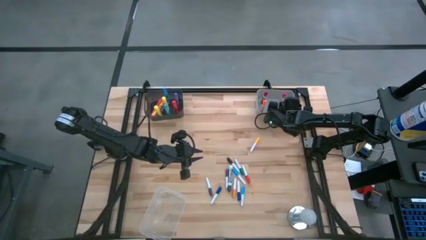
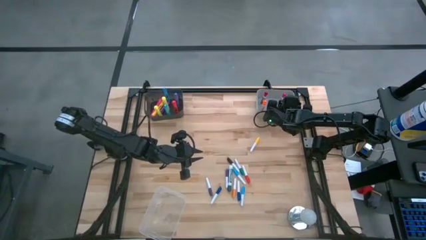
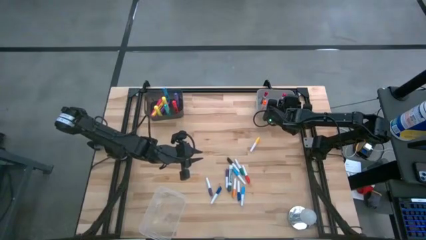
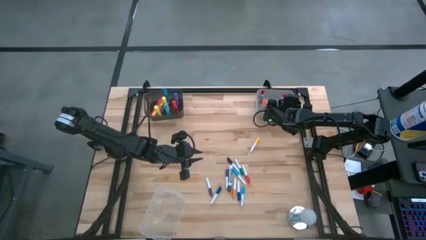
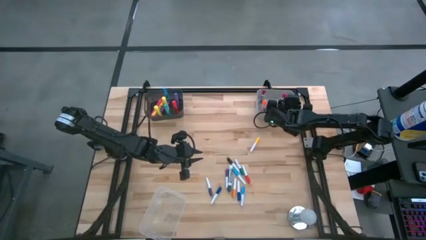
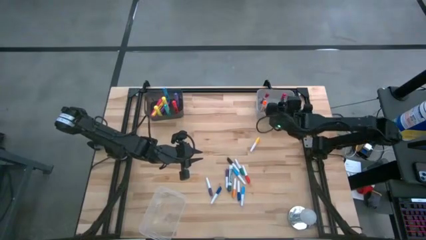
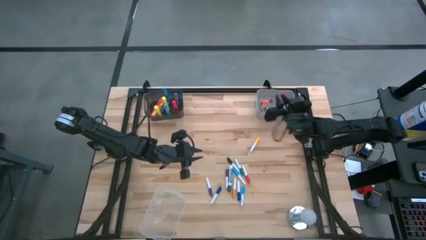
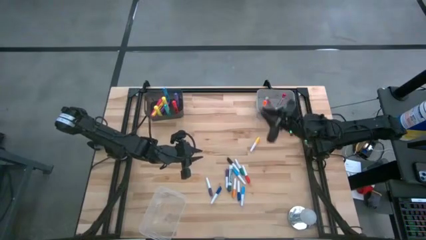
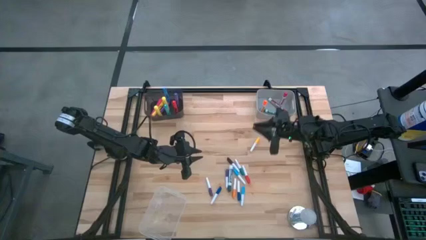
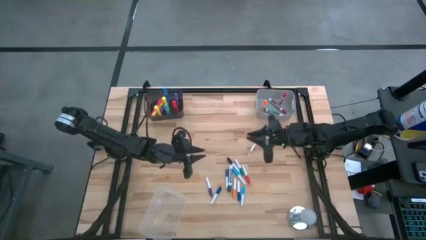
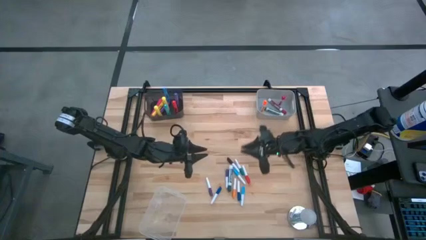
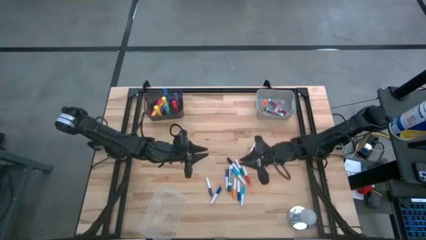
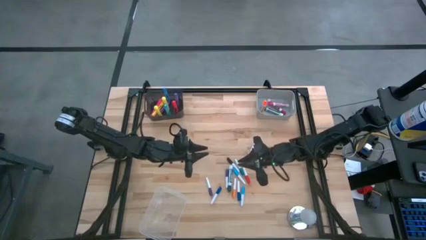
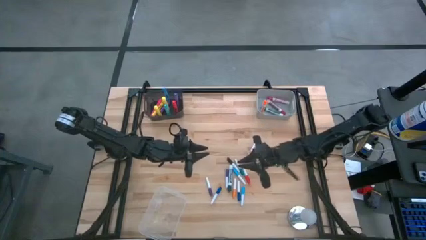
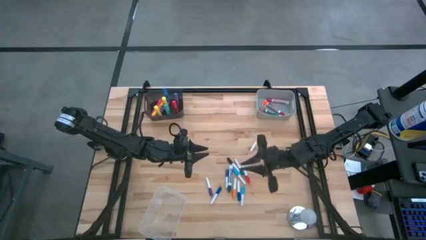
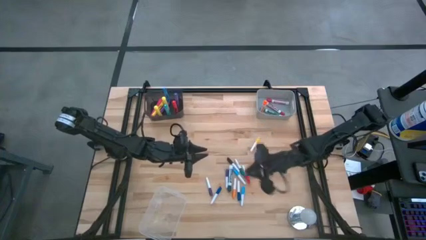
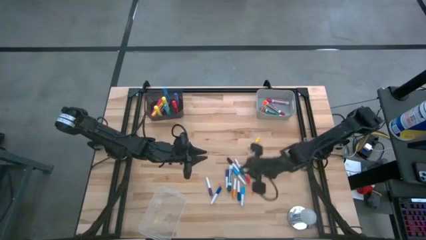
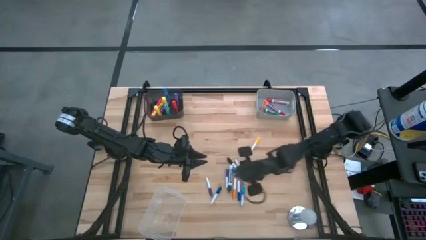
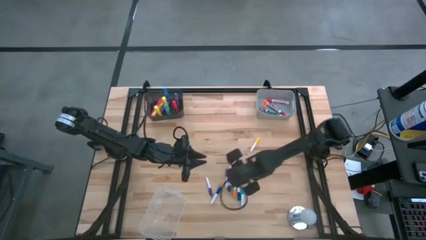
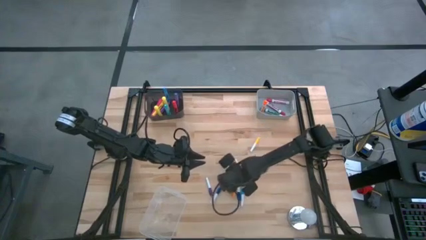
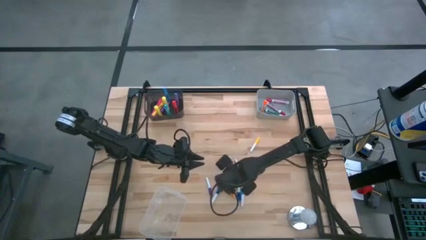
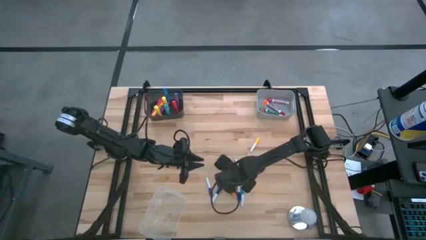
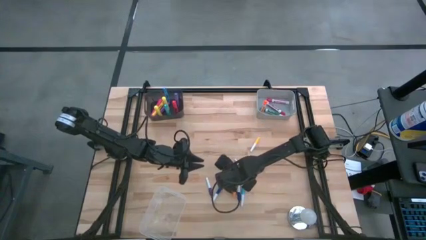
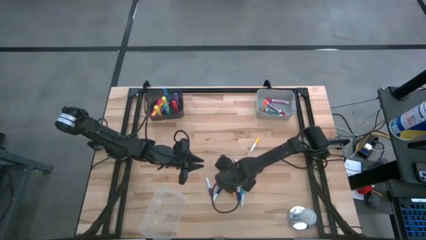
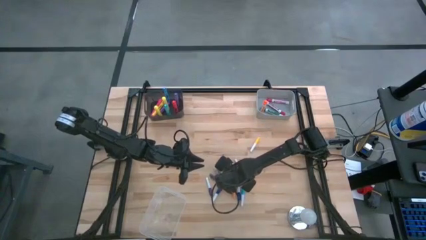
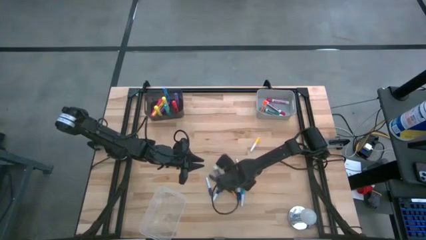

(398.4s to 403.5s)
Task: Pick & Place Markers
Put the green marker pen into the gray bin

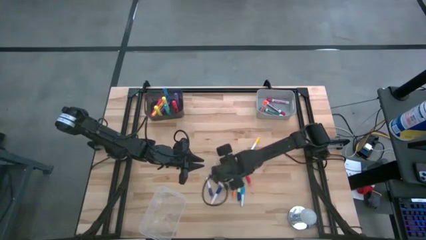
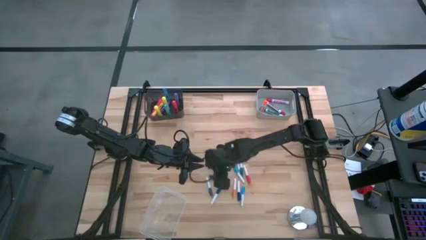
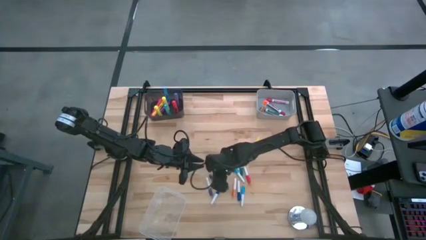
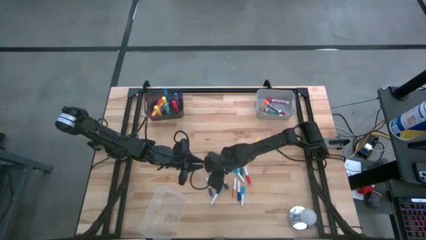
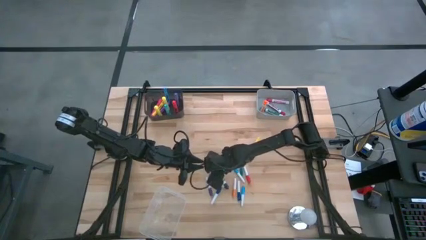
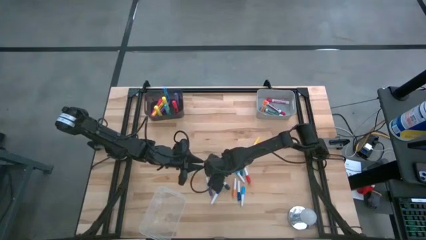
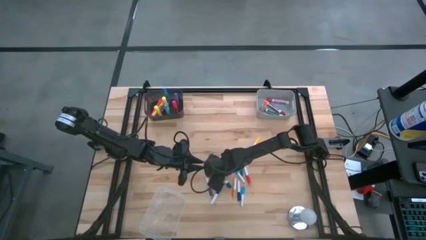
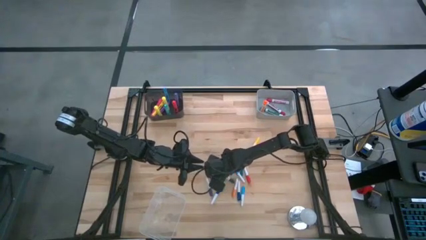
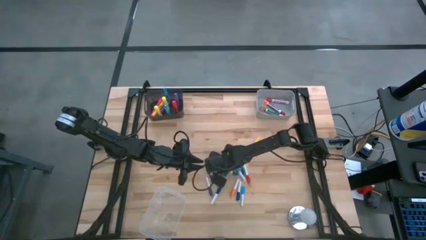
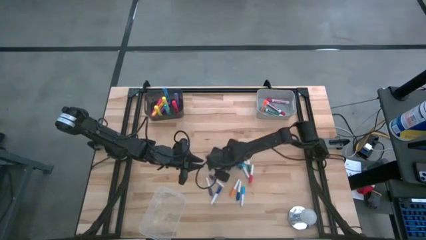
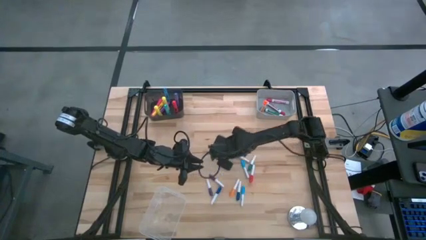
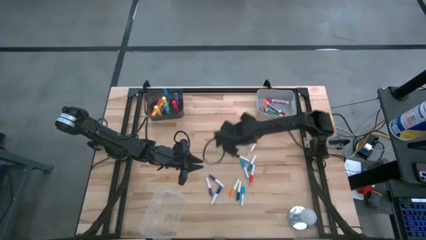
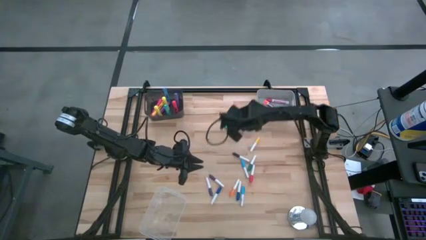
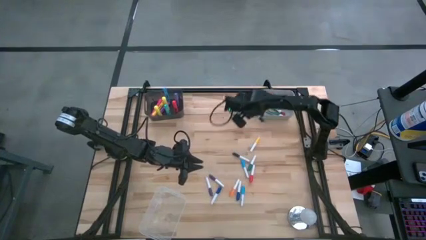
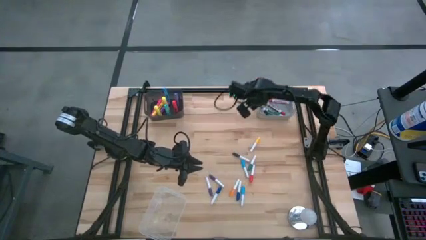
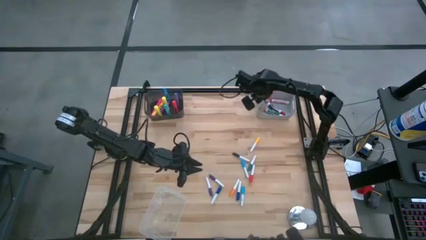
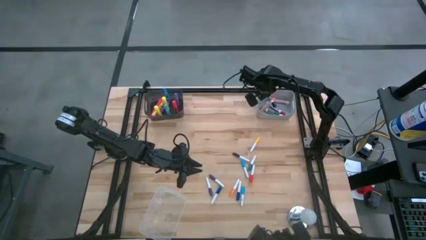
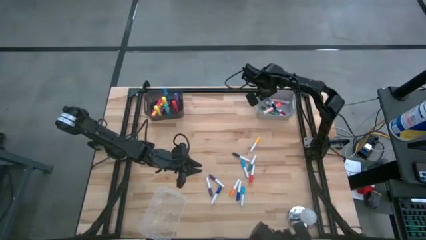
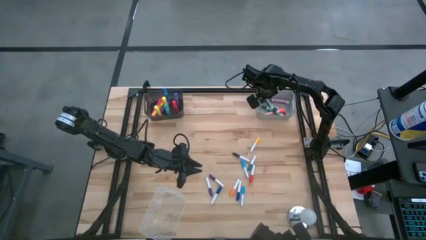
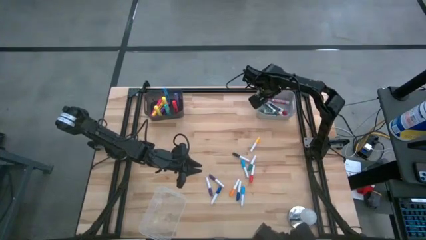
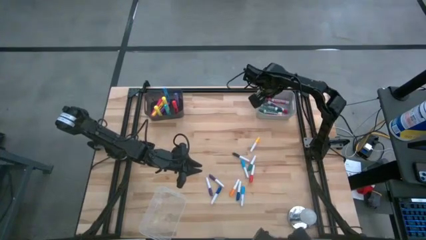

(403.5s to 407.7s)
Put the green marker pen into the gray bin

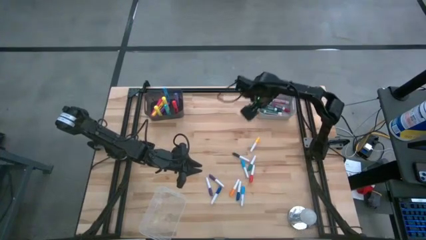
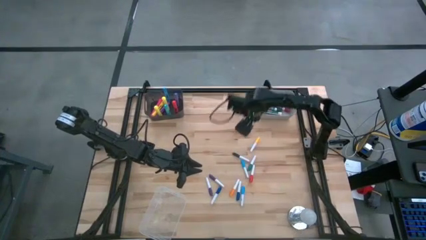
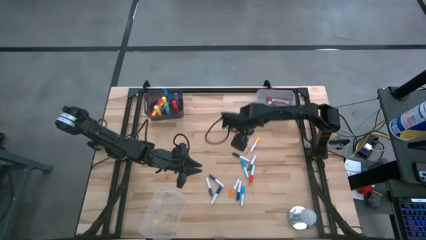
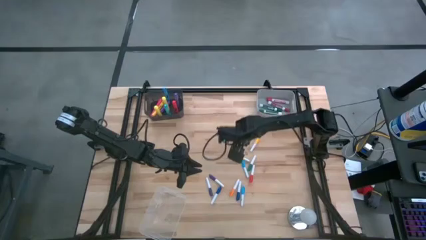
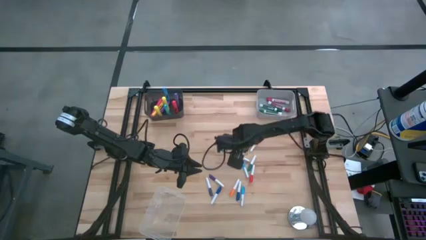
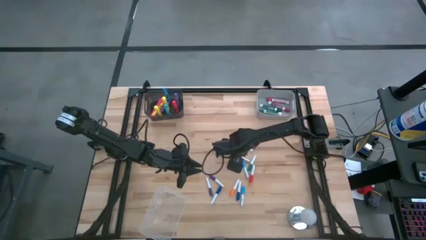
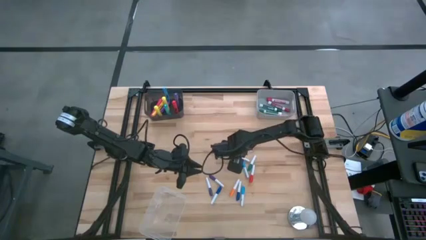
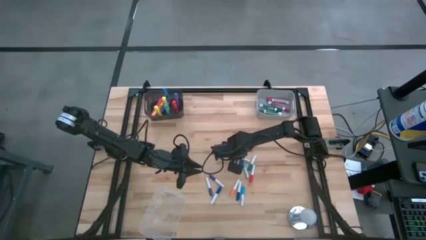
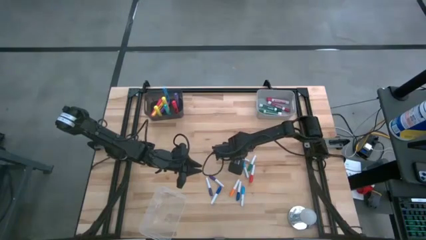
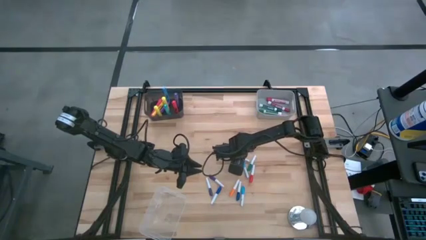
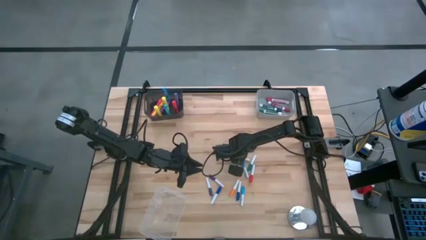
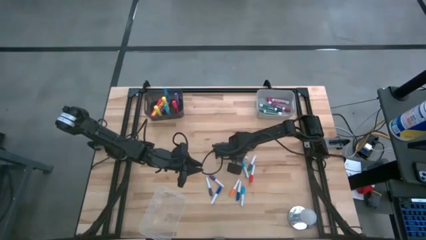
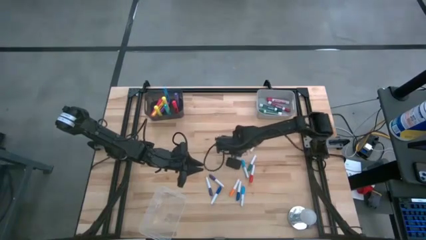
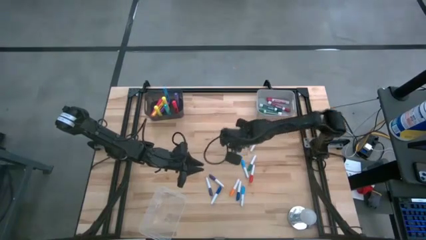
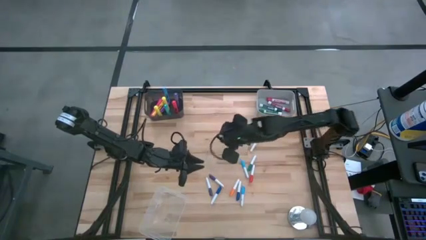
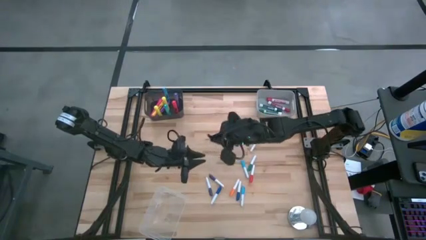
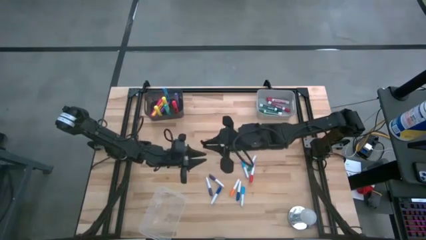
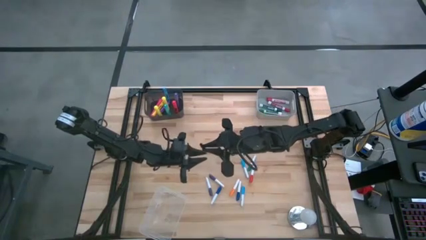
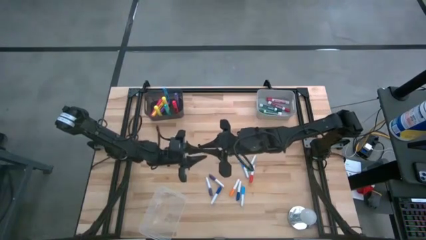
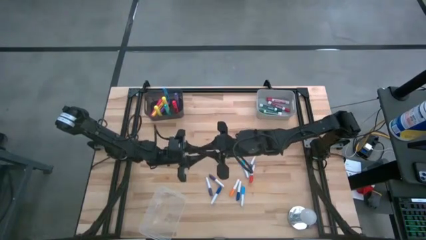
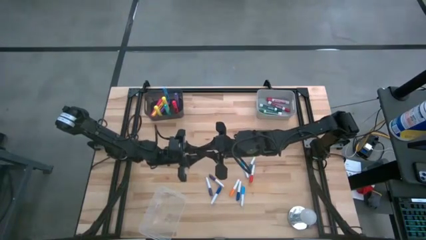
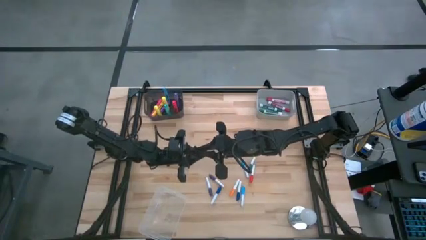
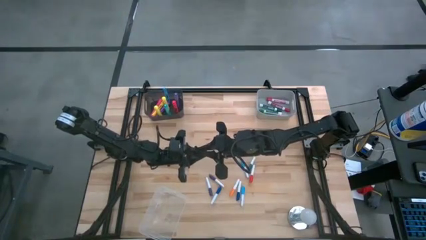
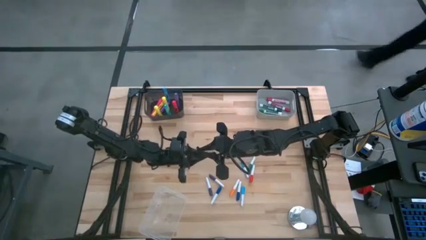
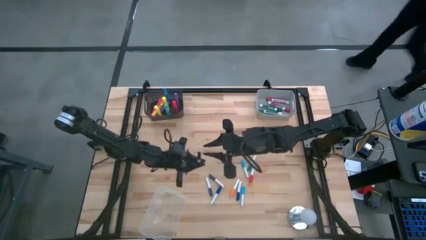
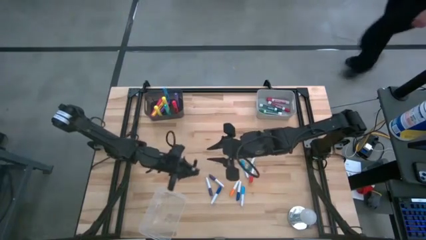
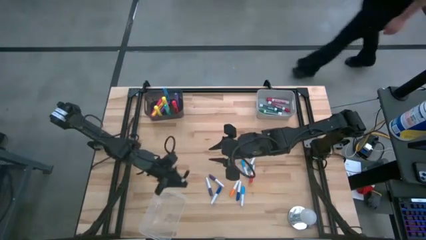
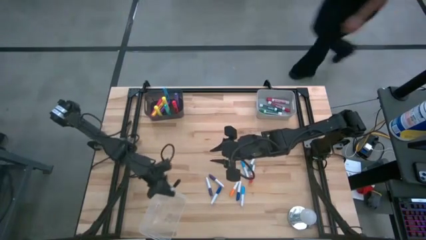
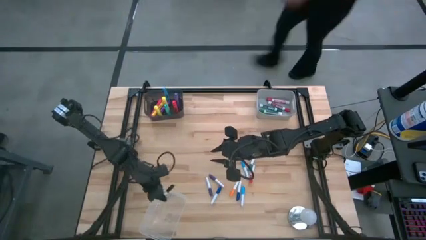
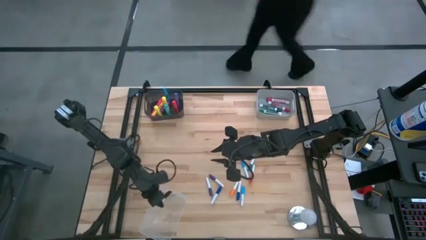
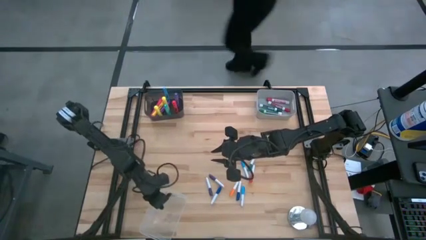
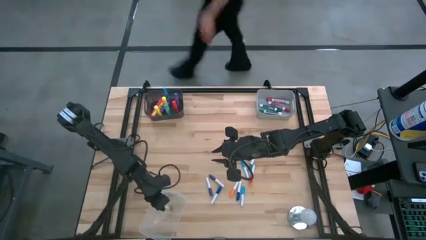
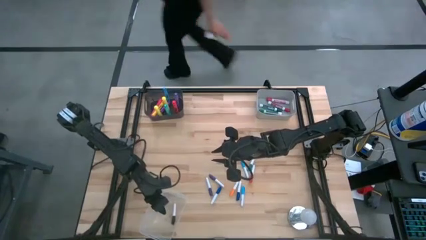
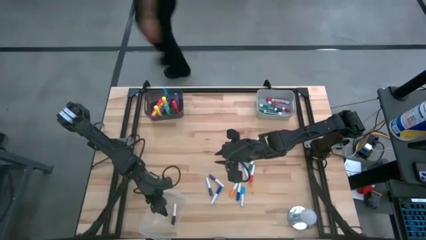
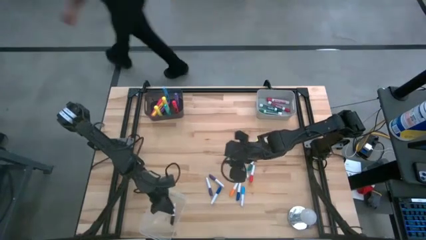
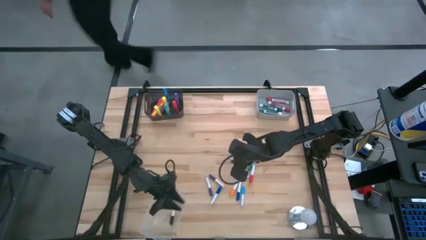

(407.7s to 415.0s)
Put the black and white highlighter pen into the transparent bin
